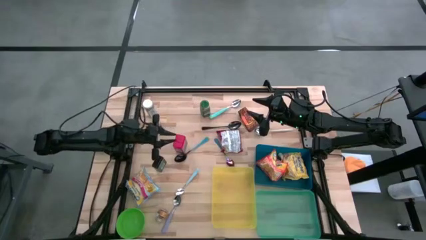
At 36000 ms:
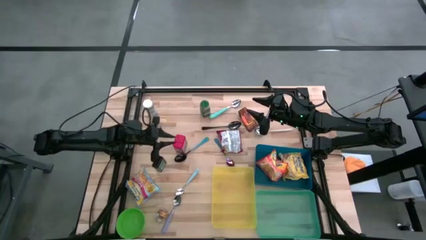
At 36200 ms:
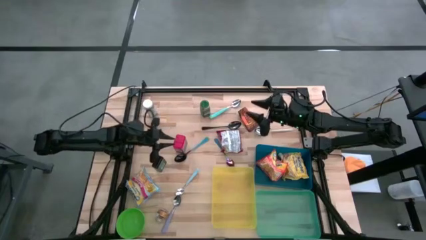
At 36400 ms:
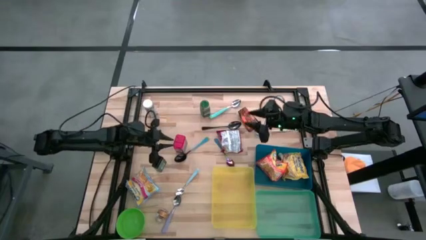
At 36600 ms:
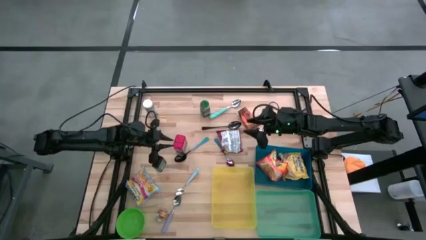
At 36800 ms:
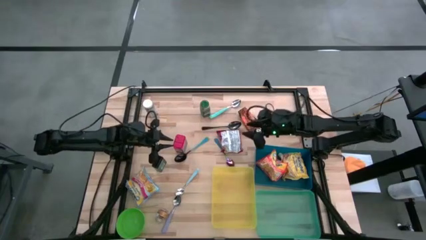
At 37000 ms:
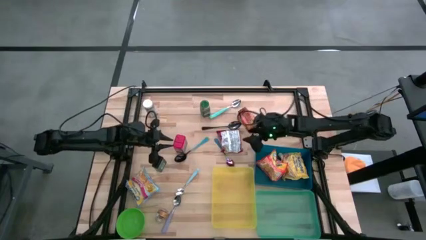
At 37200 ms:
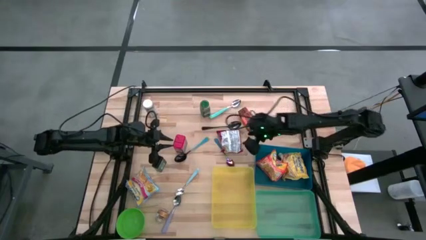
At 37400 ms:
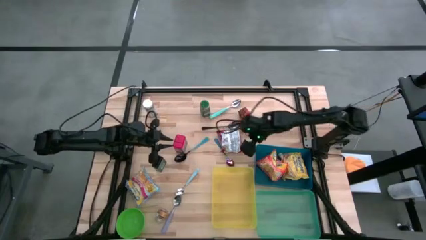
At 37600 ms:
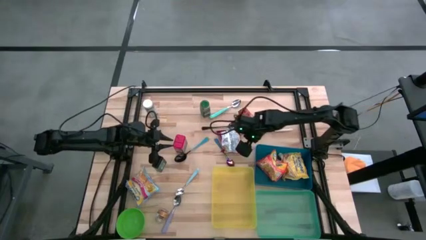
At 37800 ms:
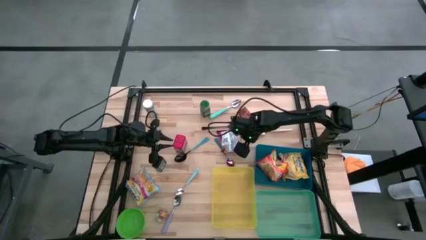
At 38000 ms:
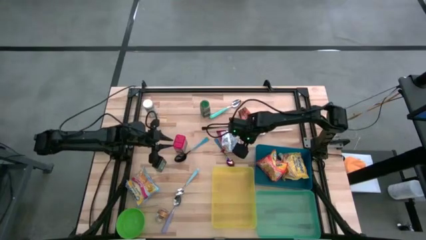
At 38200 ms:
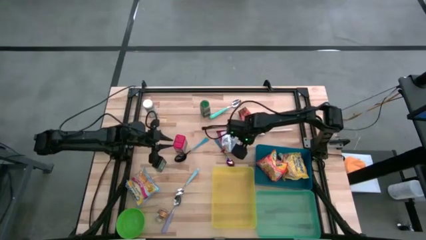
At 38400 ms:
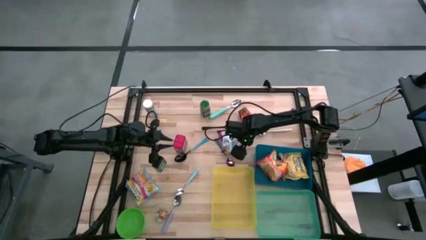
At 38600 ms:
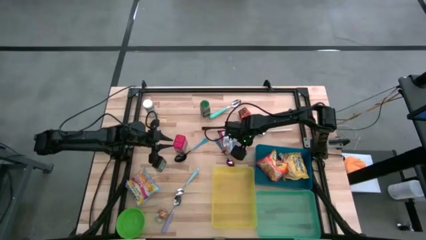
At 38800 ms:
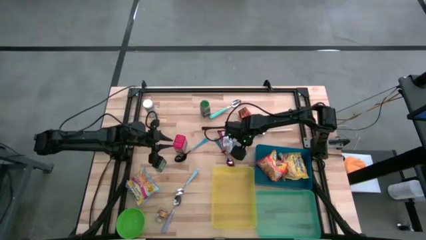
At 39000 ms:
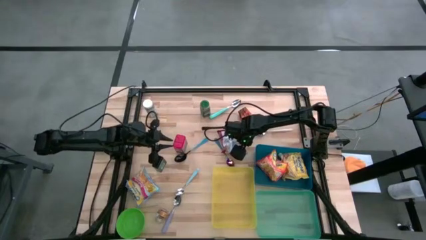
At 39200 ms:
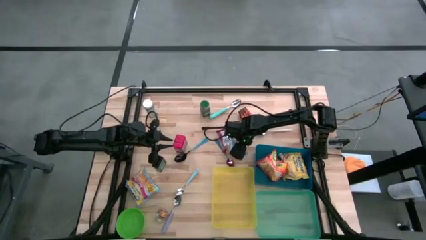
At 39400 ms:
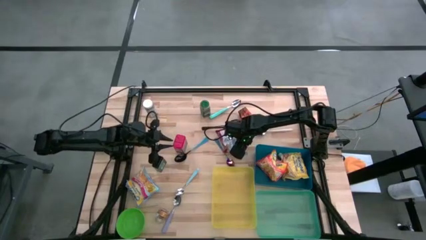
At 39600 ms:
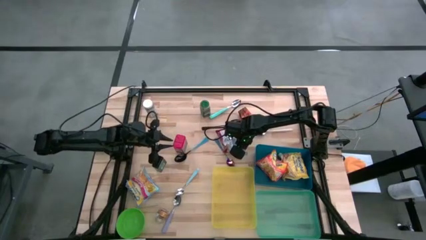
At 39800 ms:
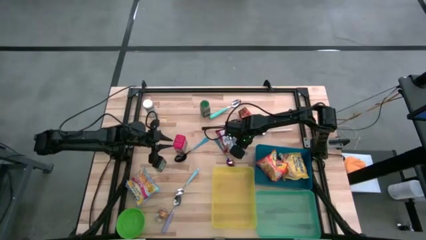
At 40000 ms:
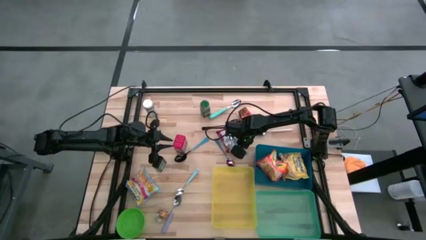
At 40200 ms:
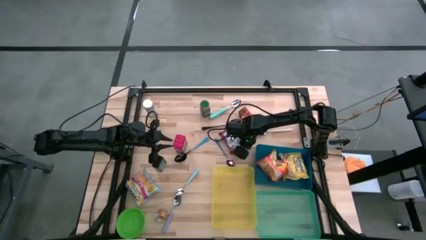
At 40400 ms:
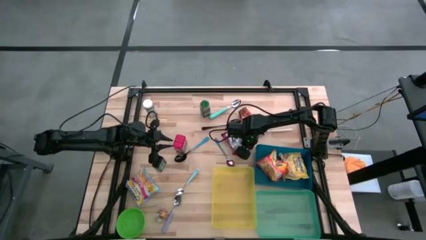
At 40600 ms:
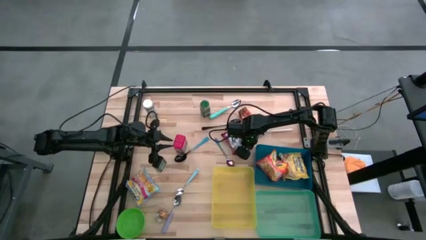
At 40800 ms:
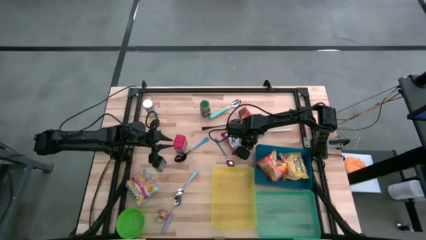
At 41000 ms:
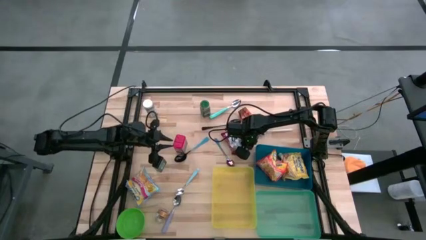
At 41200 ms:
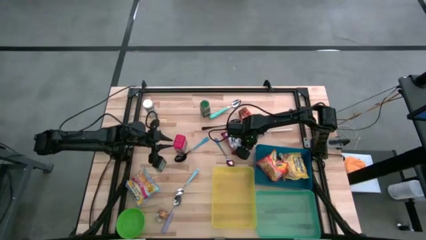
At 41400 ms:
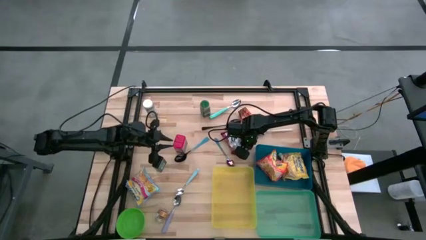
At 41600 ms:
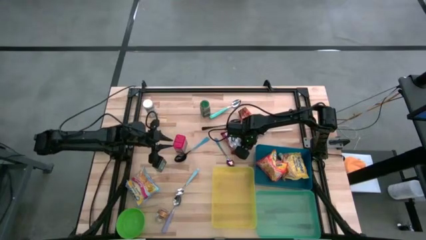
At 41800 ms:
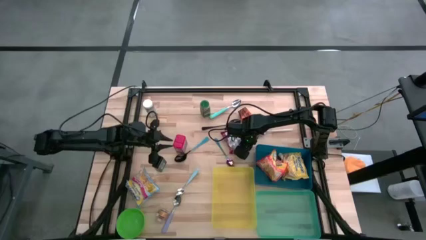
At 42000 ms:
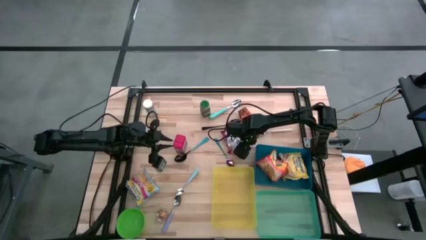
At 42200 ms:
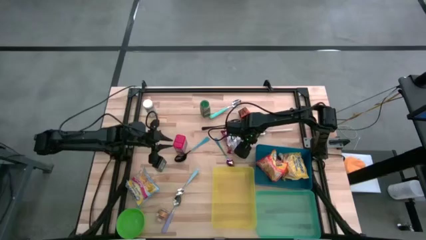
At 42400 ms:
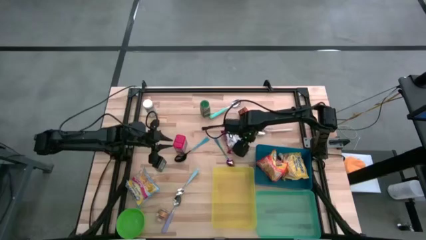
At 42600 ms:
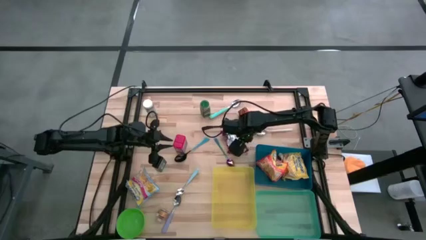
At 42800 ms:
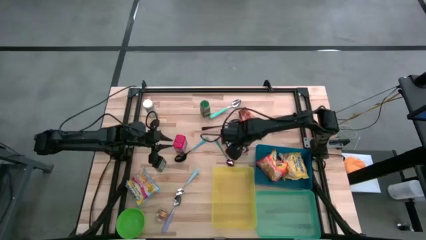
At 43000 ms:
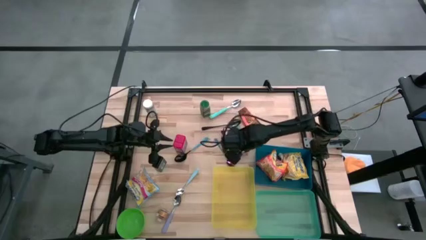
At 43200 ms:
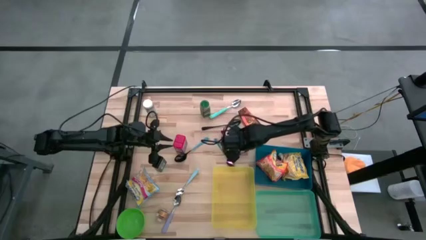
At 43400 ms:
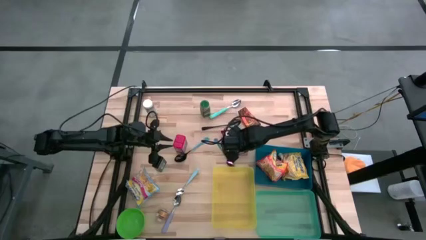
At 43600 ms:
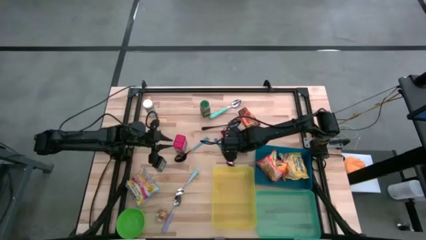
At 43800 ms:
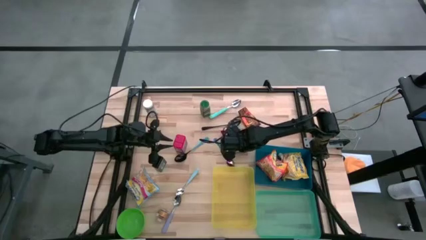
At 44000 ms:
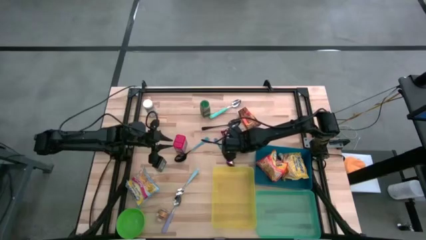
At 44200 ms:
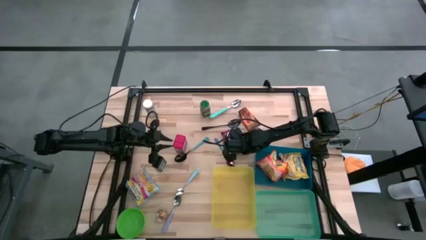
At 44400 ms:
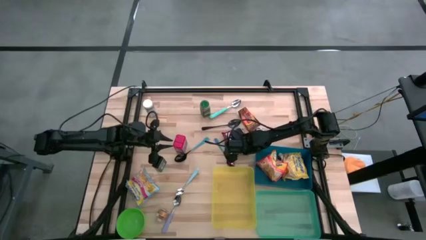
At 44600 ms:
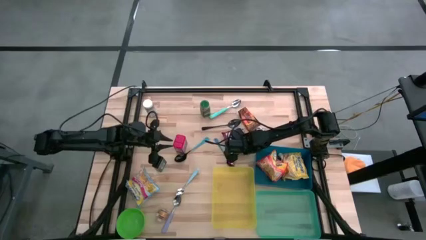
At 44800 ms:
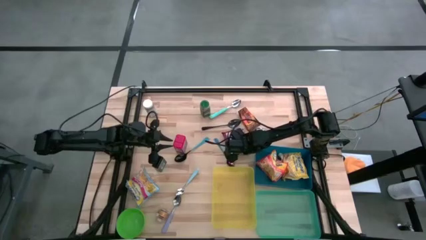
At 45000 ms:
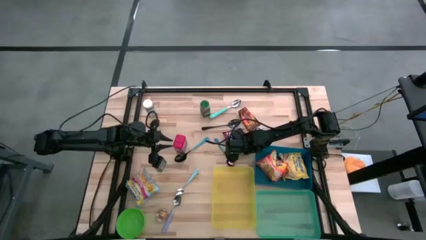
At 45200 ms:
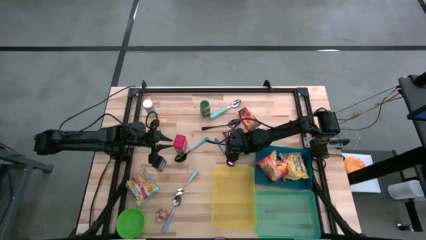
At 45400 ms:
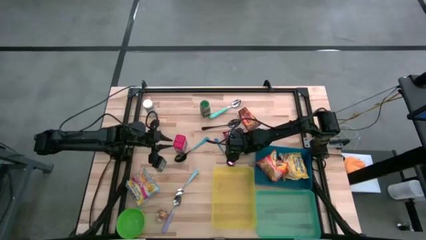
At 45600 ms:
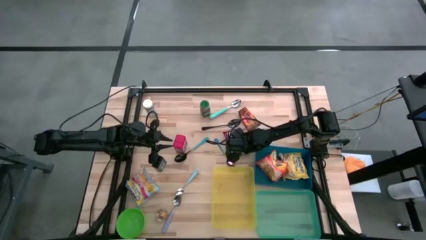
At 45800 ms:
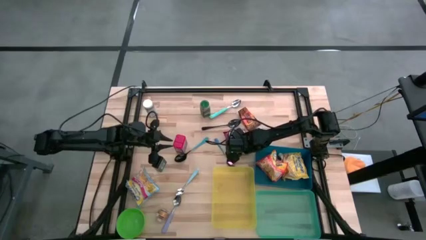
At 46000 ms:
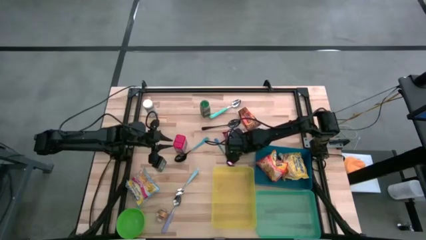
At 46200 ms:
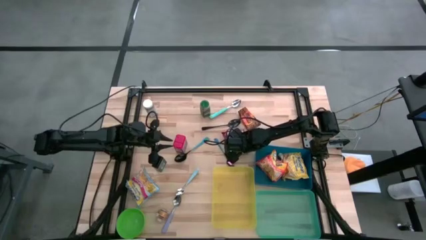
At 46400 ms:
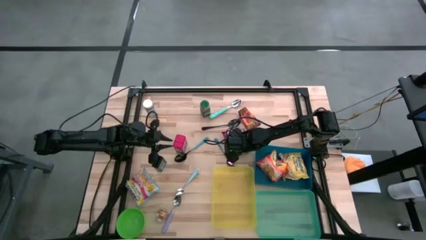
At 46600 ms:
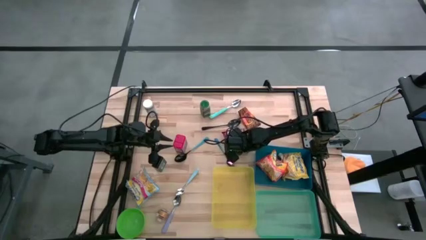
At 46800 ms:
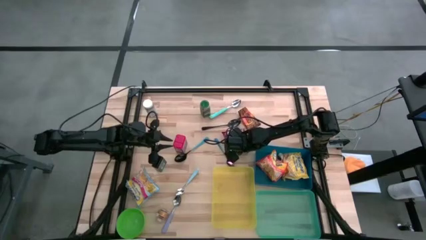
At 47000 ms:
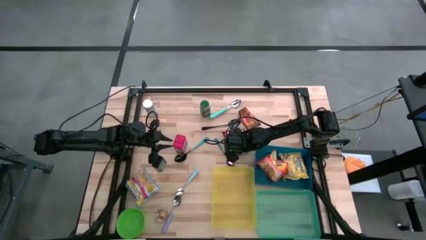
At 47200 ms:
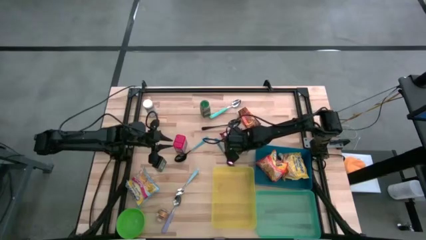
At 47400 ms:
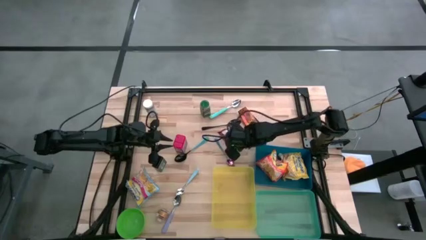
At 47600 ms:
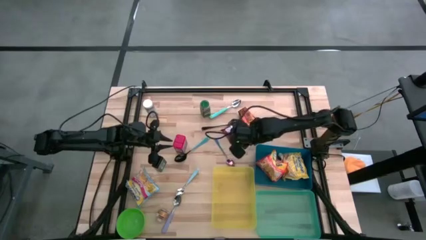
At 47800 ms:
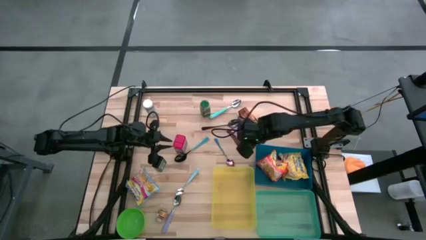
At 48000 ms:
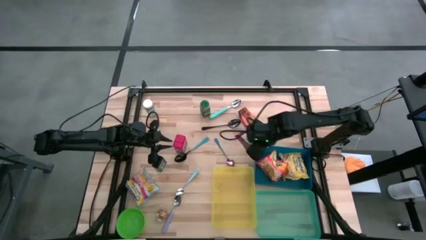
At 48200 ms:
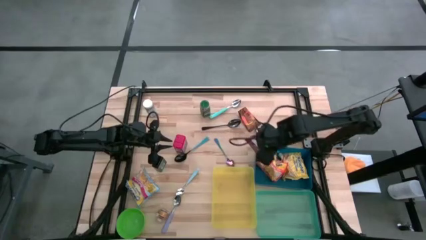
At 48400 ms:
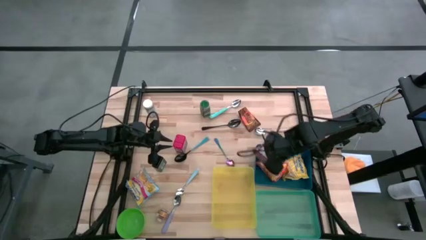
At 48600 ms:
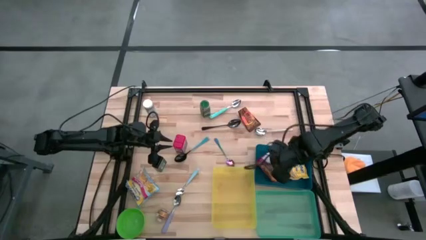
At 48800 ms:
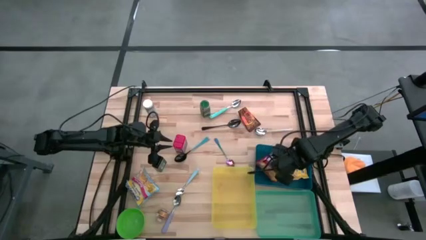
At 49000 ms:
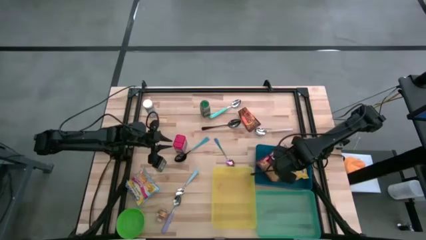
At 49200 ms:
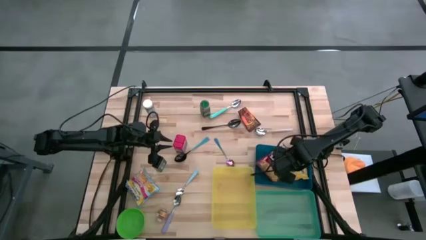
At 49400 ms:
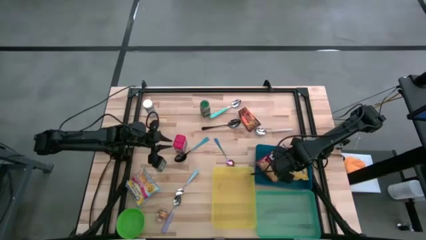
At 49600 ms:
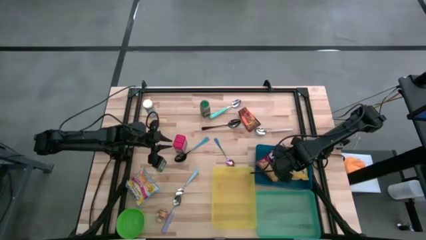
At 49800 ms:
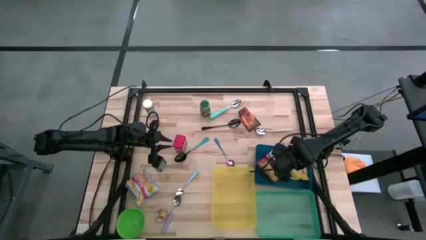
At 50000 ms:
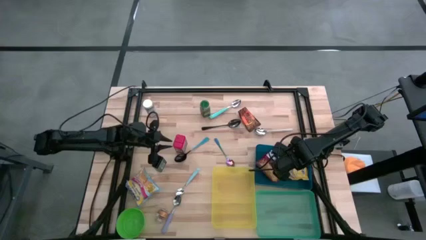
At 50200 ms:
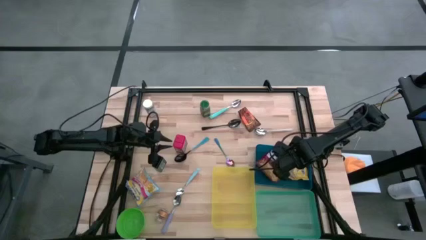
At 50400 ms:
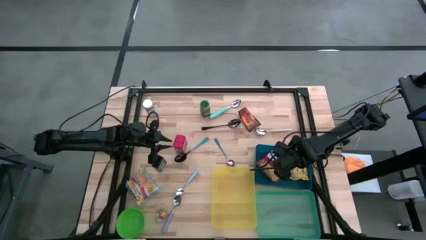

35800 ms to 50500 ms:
Put the red noodle pack into the blue bin
